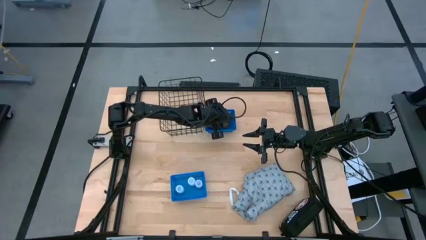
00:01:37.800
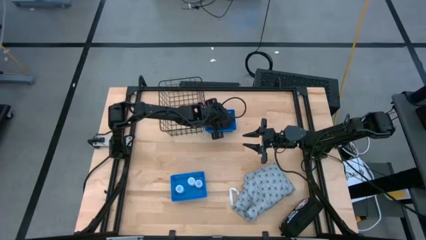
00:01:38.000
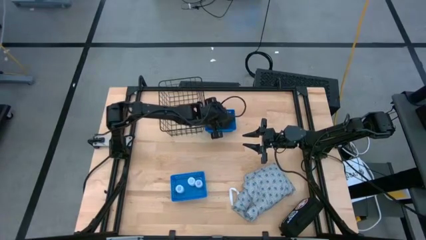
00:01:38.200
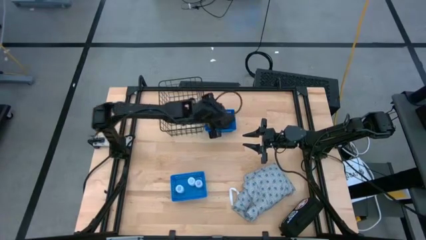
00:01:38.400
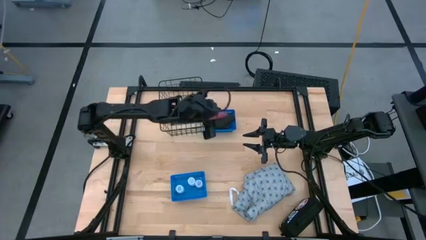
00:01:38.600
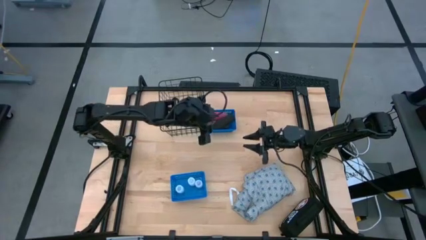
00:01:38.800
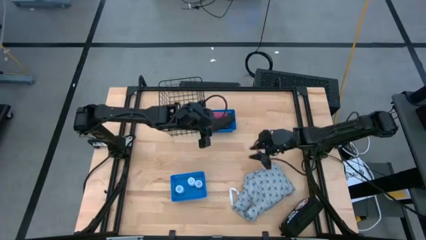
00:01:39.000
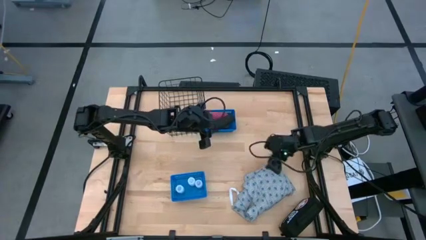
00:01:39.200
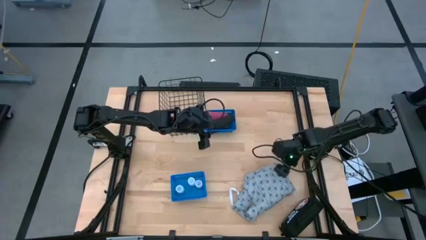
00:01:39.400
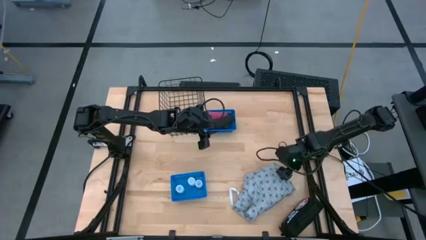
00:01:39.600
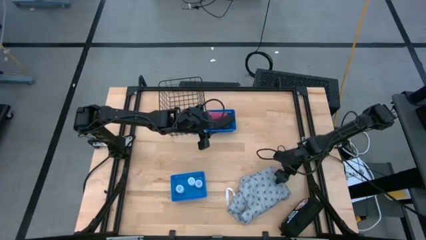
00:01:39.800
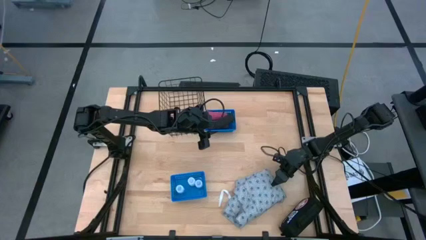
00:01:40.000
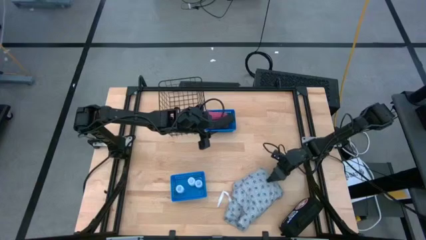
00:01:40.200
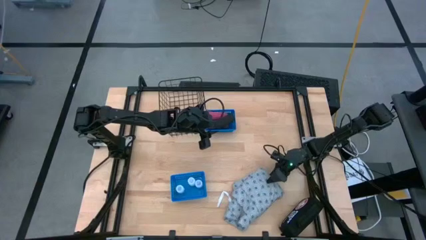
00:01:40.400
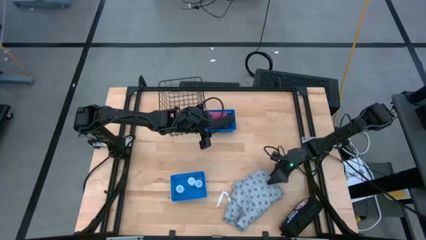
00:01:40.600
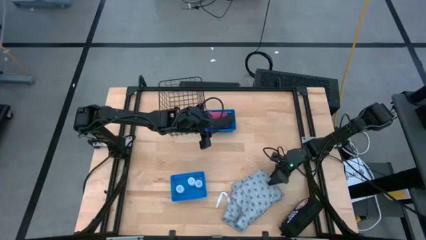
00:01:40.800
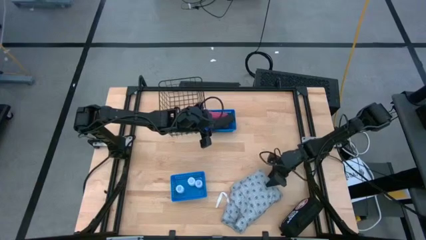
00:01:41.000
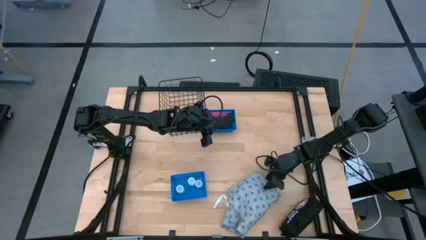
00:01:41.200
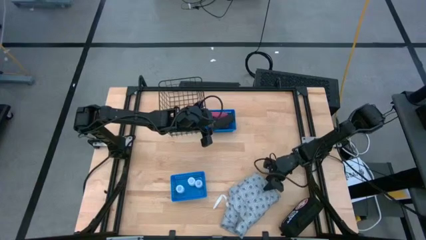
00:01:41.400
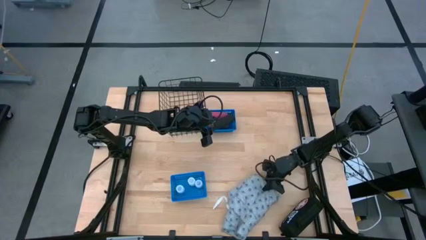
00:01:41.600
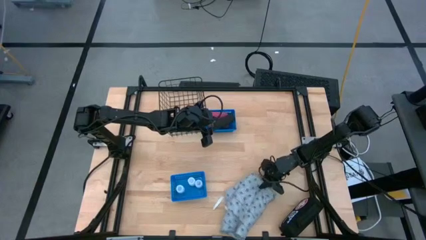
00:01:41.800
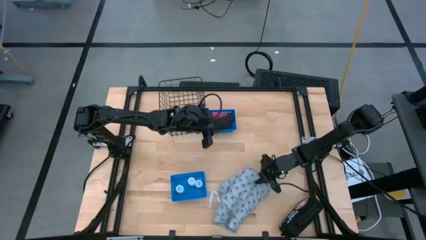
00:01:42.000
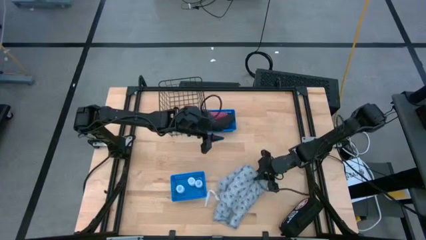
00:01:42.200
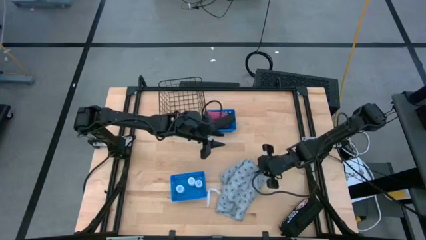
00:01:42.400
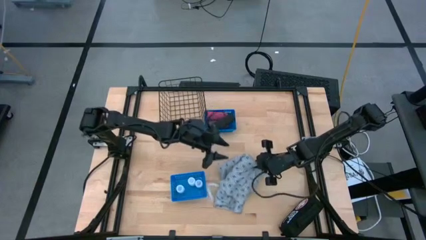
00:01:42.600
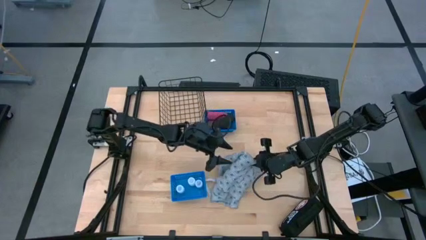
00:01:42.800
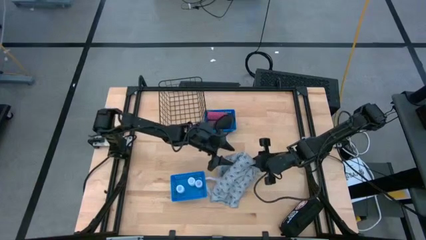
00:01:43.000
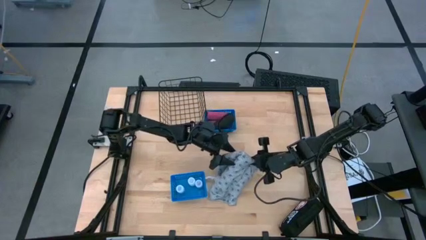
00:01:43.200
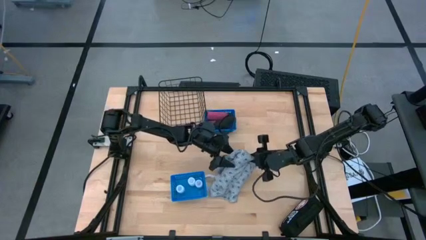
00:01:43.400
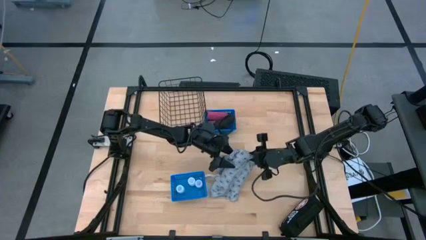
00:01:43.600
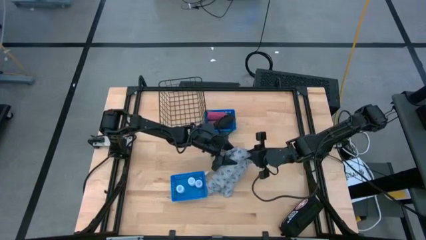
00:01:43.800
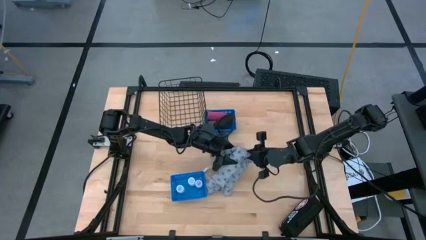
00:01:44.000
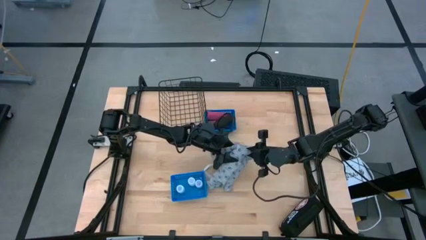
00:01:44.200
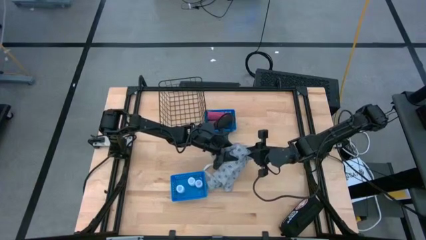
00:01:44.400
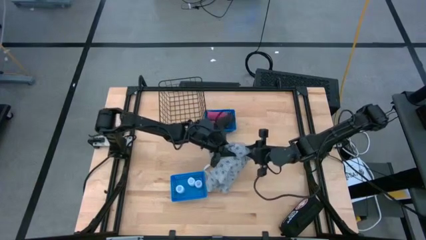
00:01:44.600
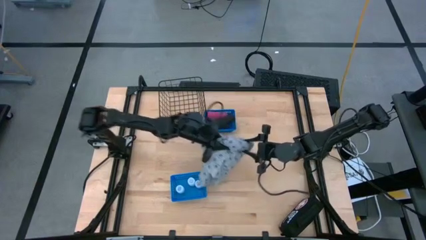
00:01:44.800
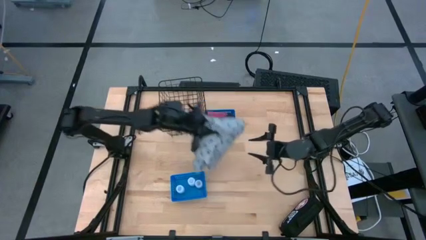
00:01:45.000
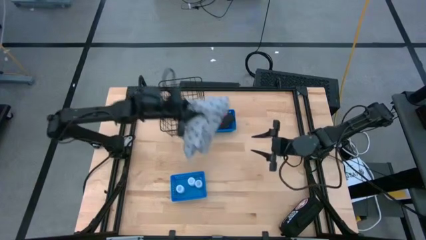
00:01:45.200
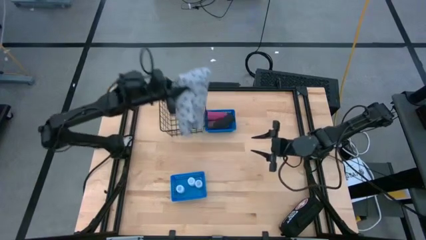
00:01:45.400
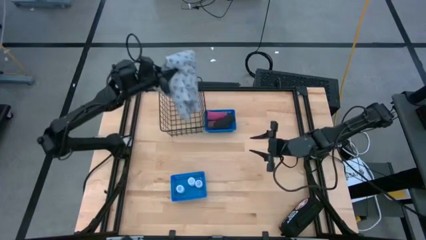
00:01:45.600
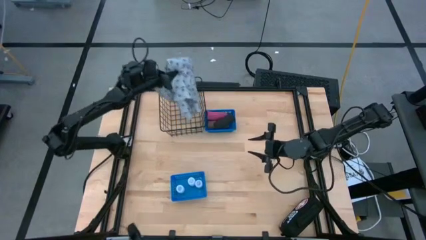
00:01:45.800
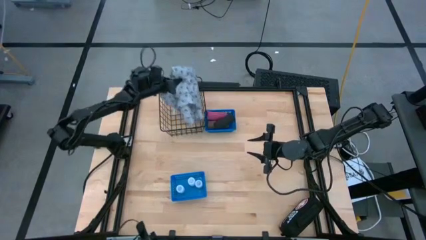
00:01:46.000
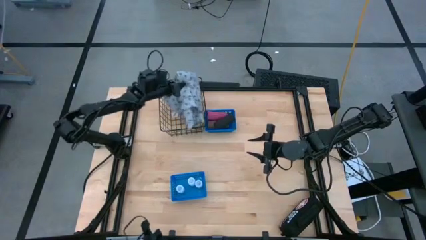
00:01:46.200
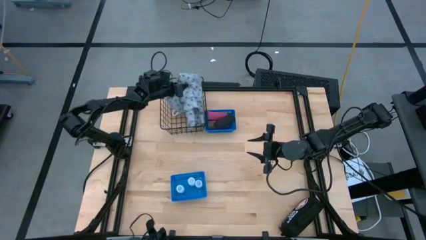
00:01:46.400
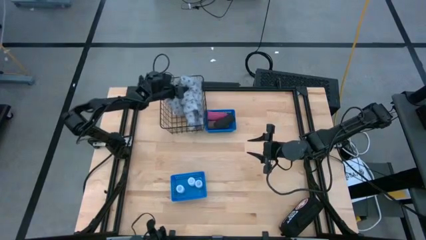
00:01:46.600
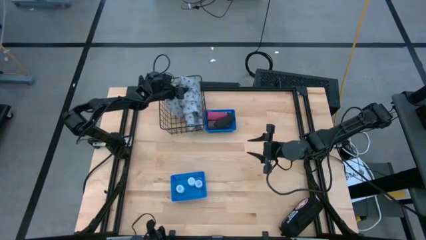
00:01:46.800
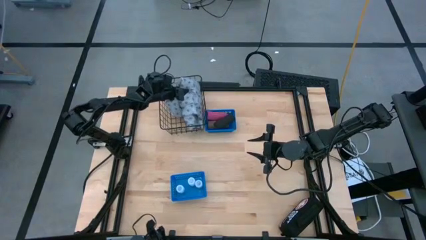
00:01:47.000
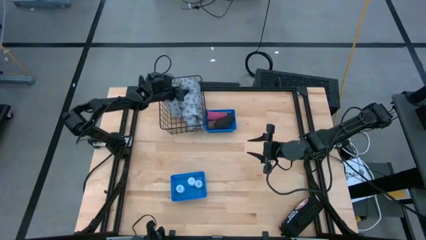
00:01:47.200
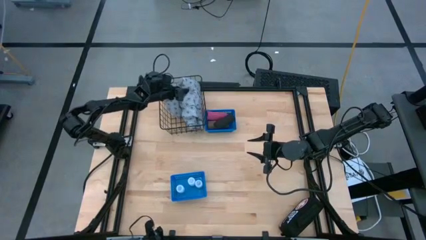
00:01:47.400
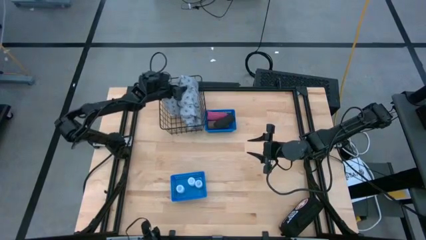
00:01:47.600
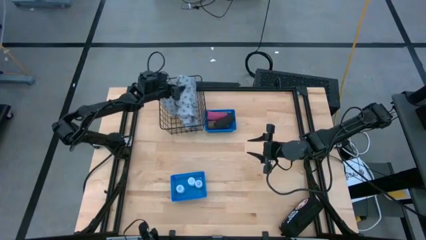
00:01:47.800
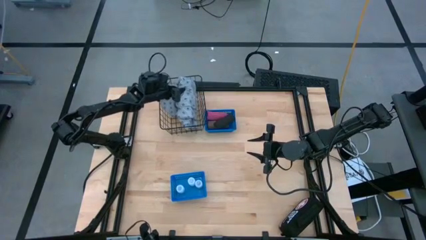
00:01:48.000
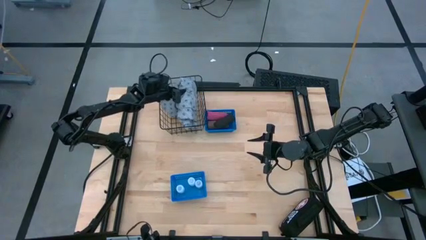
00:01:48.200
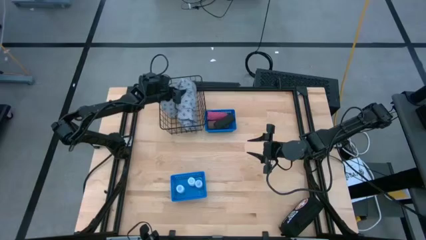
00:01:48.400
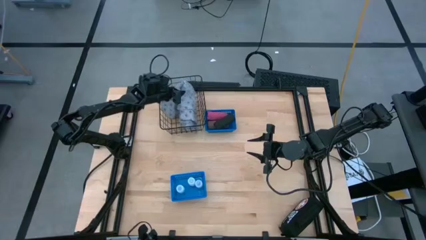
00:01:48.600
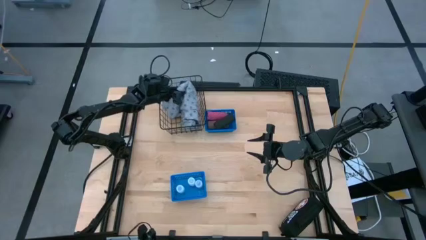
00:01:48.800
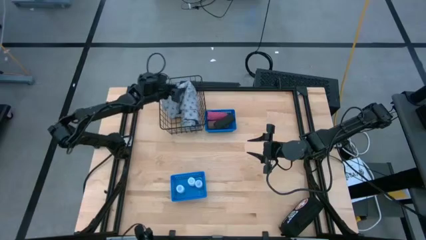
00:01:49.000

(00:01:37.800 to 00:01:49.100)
Task: Pick & Place Medicine items
Put the gray patient gown into the black wire basket

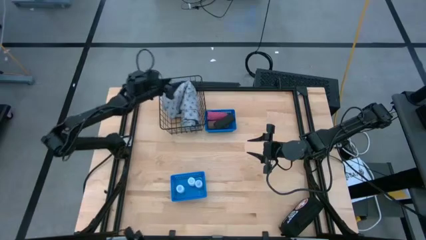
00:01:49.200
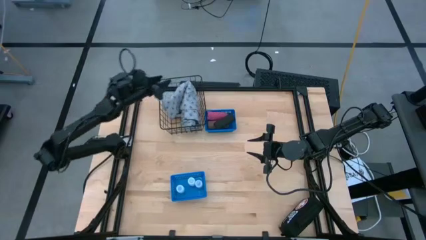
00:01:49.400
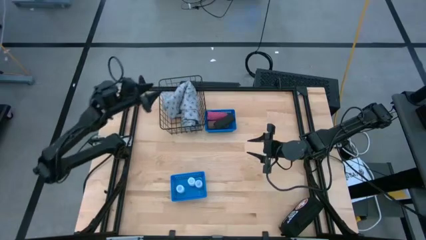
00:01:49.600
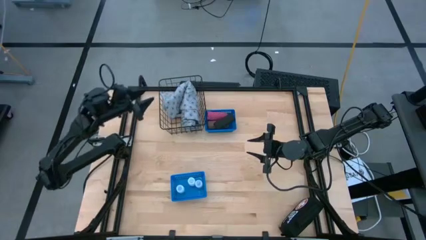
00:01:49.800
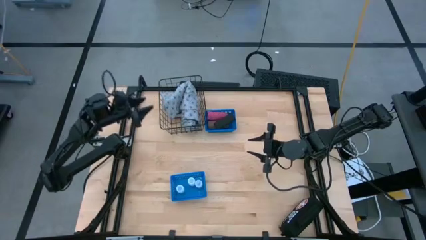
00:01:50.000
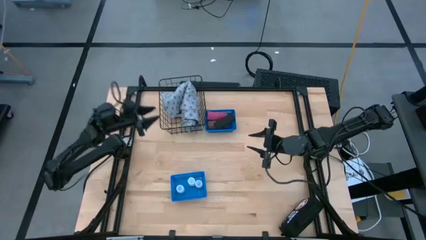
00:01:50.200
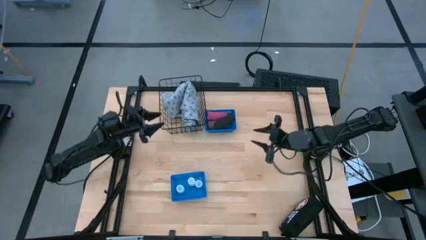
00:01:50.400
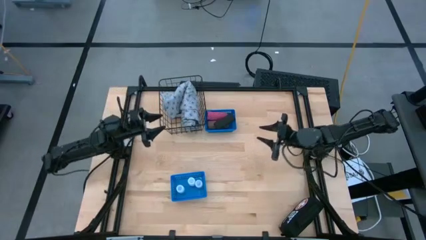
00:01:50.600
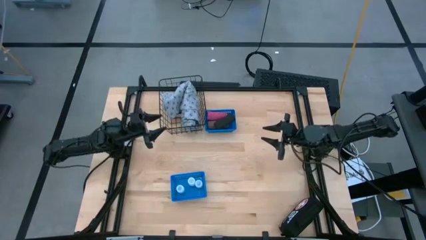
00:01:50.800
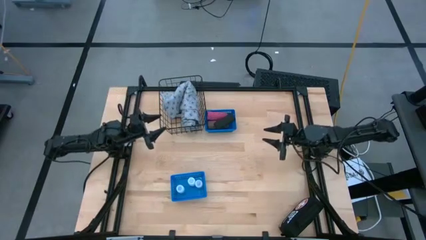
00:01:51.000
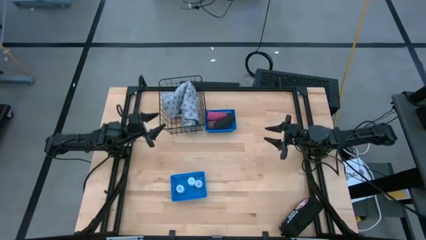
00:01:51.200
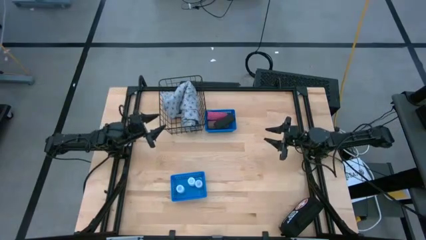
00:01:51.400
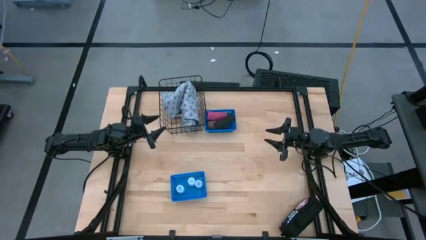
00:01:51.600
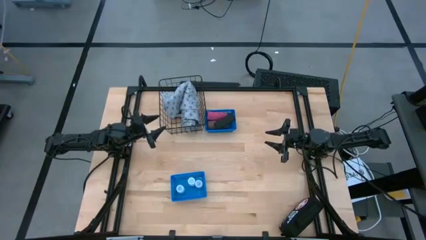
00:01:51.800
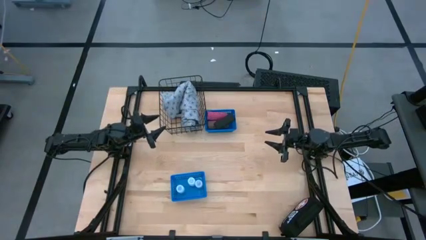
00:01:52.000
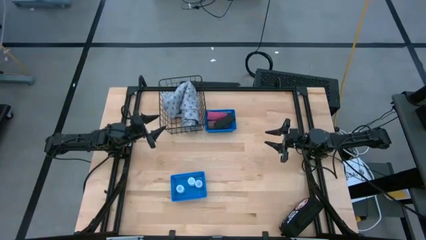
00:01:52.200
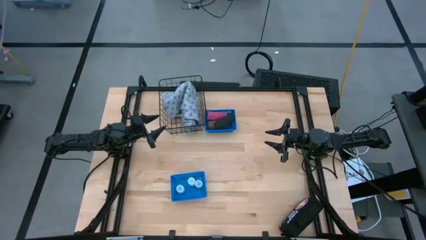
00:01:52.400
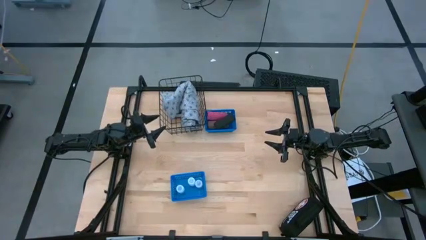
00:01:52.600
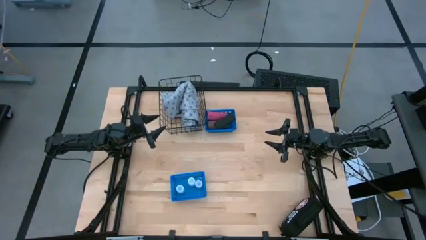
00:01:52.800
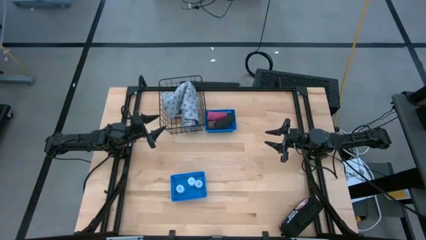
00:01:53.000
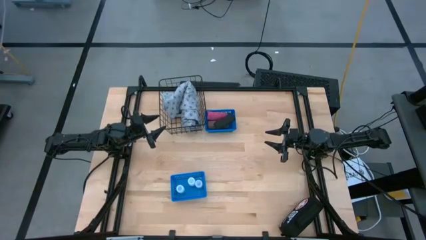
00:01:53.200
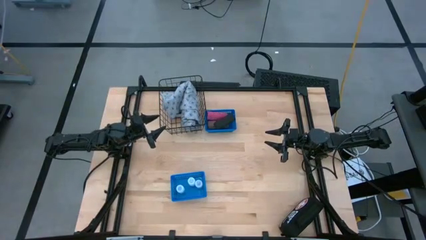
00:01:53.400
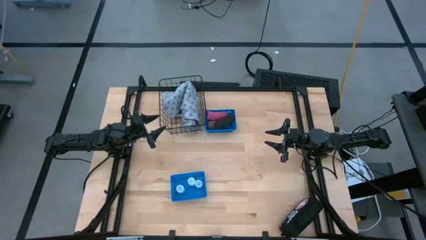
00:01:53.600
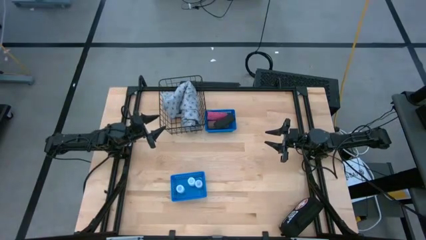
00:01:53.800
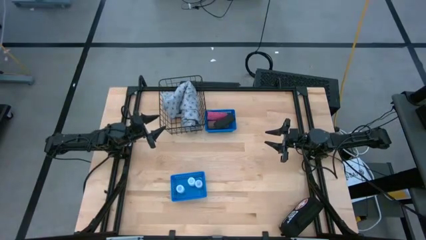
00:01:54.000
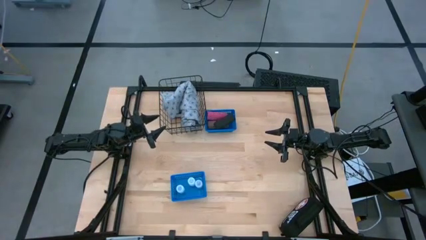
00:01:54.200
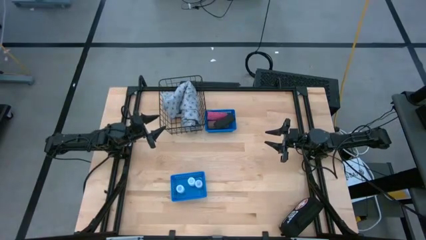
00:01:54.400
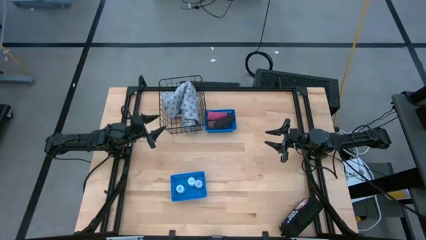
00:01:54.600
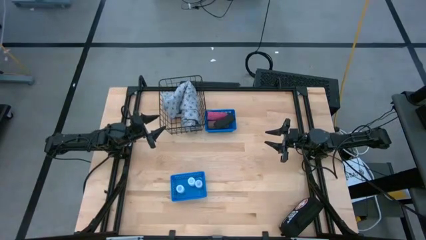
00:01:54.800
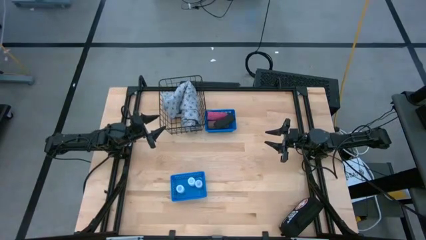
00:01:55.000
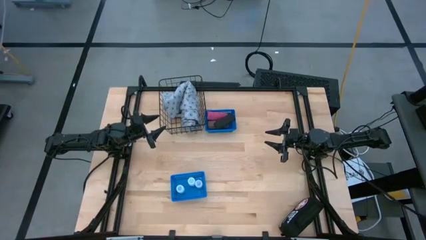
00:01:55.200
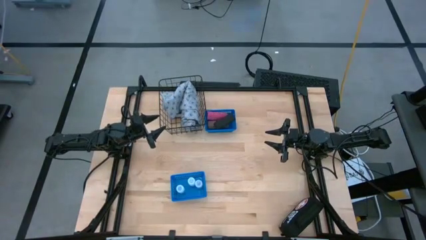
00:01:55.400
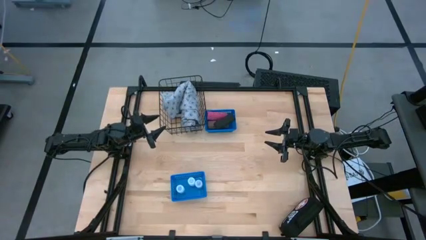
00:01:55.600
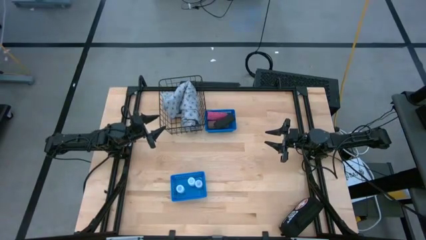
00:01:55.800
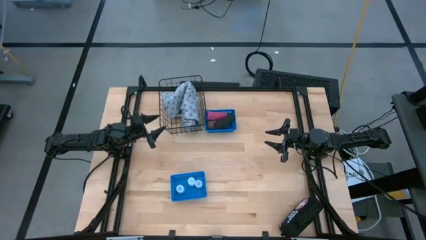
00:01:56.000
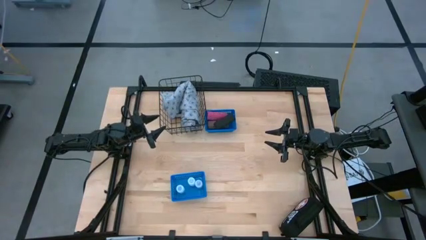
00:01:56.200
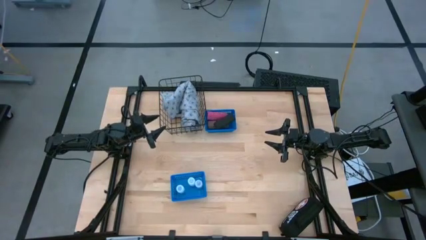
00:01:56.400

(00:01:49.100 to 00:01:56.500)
Return to Home Position
